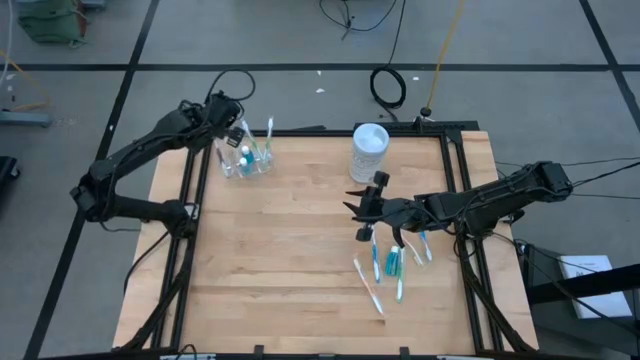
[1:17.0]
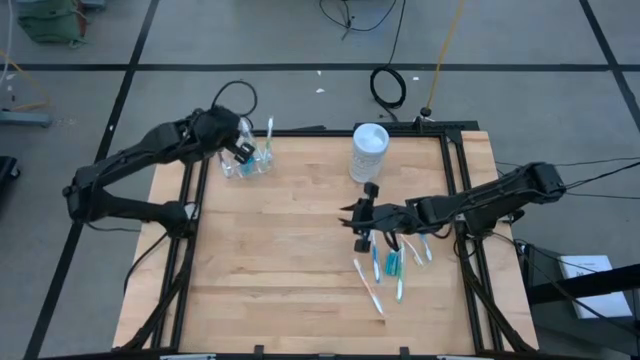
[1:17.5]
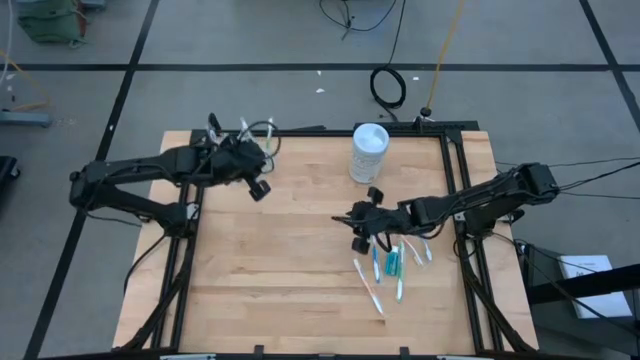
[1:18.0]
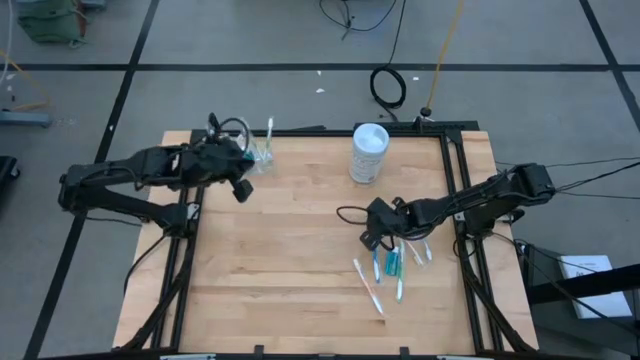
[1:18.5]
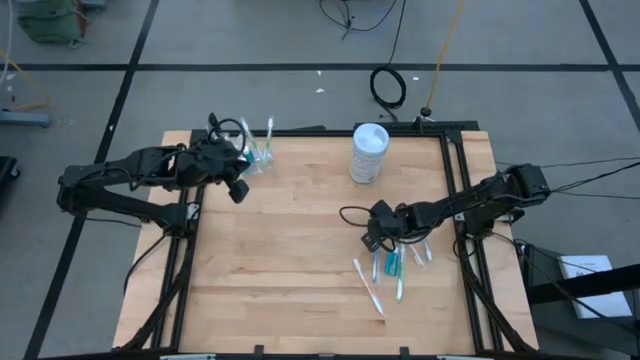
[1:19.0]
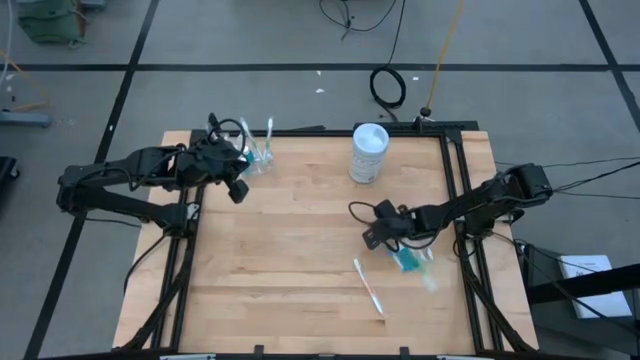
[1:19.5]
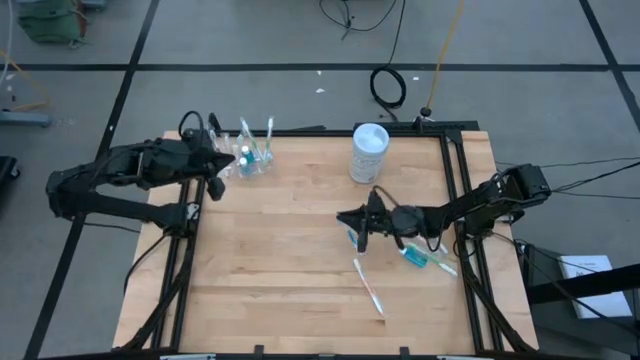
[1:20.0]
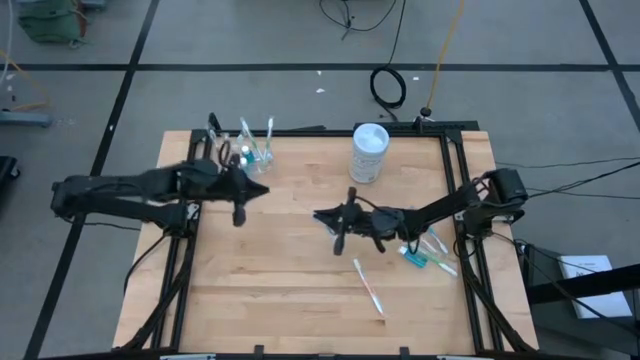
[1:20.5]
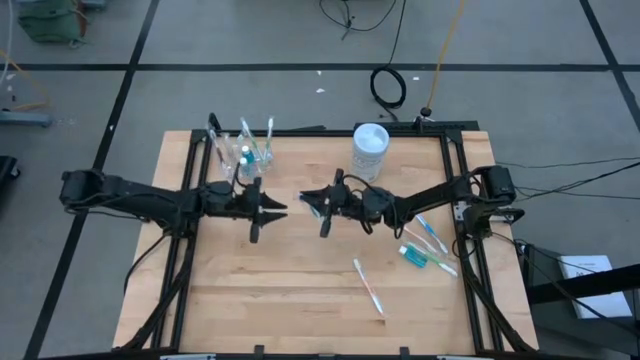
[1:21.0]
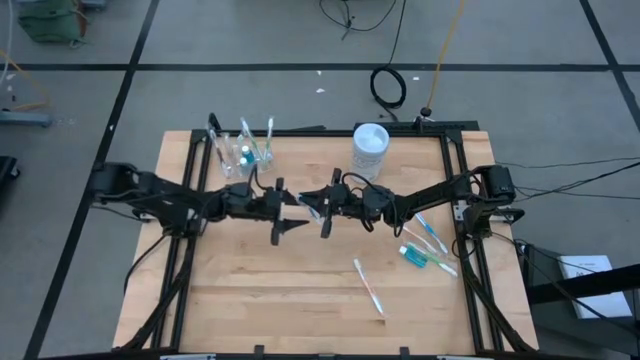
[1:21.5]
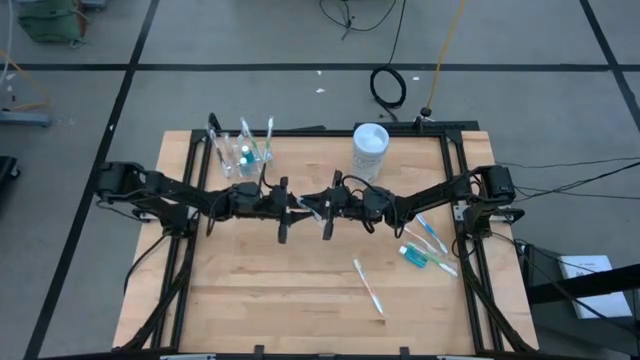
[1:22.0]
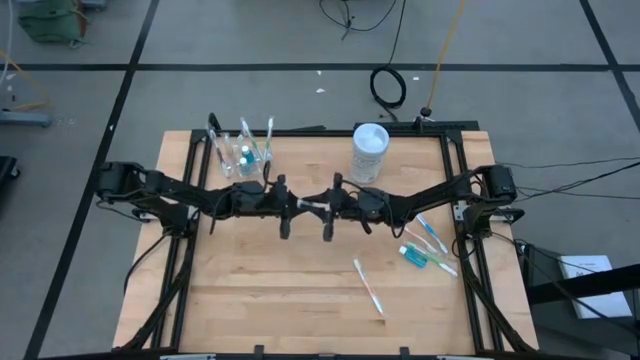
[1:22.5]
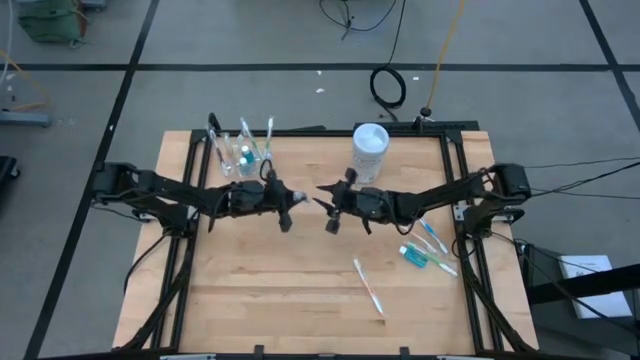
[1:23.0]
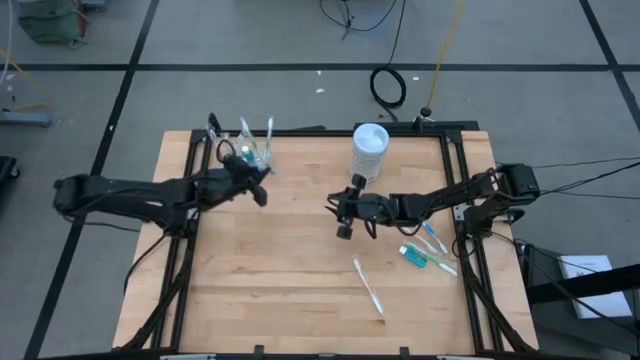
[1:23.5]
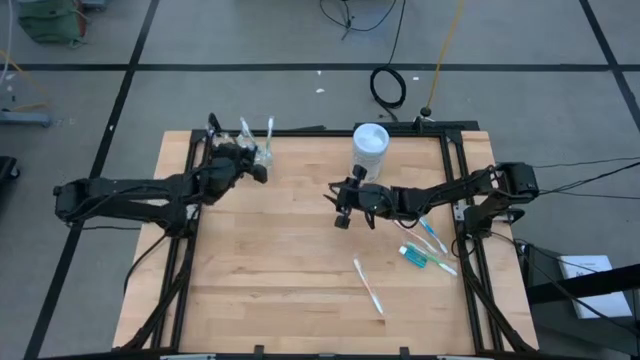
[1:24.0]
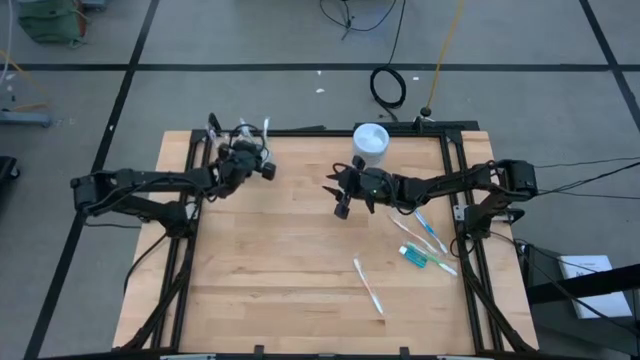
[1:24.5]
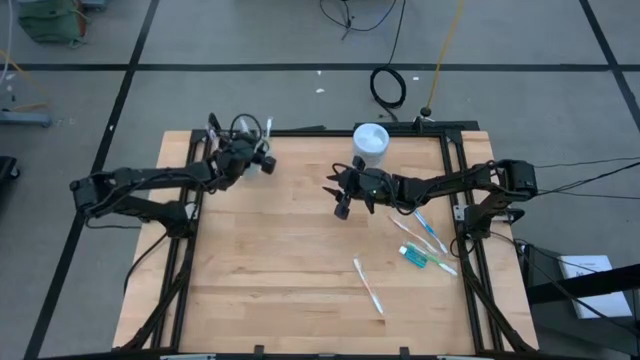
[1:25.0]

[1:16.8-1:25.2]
Task: Pick & Place toothbrushing station
Put the blue toothbrush into the transparent organizer

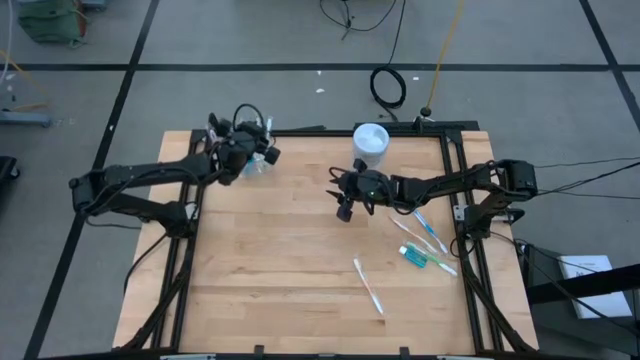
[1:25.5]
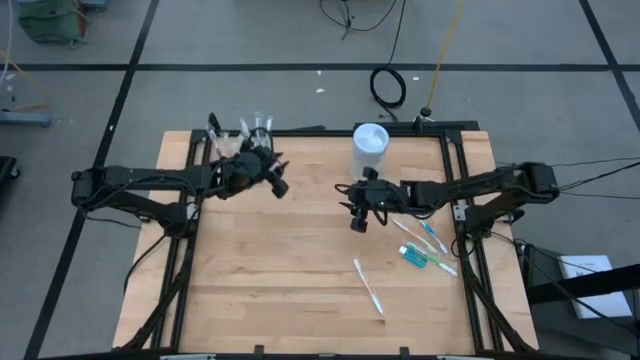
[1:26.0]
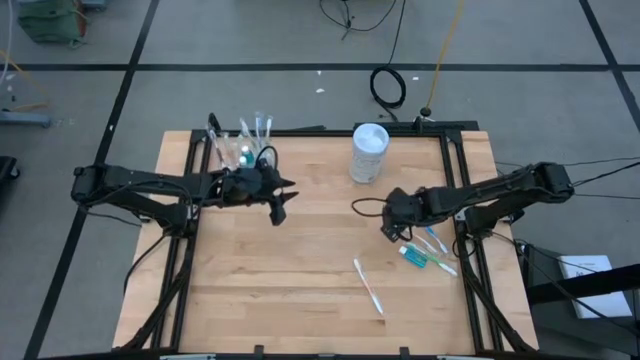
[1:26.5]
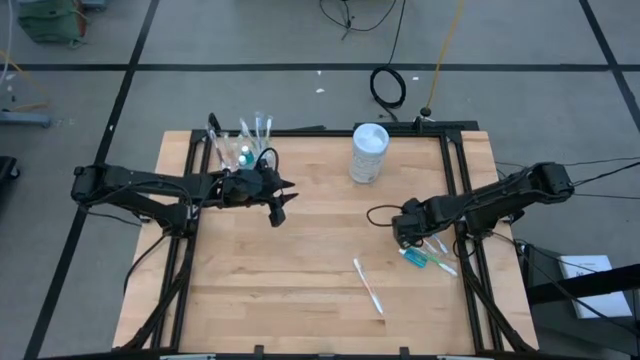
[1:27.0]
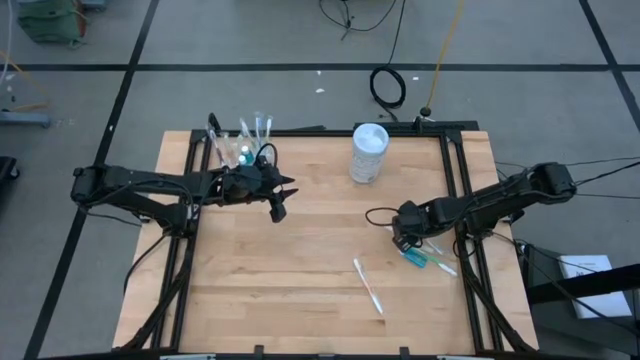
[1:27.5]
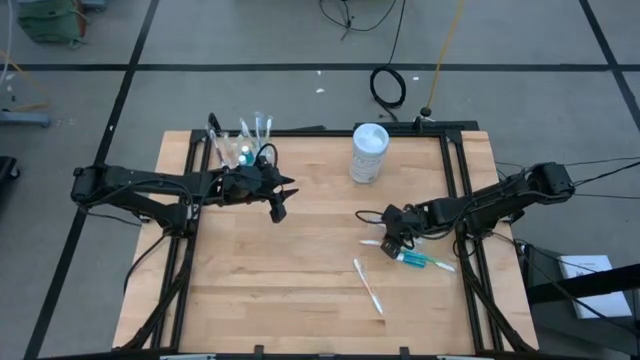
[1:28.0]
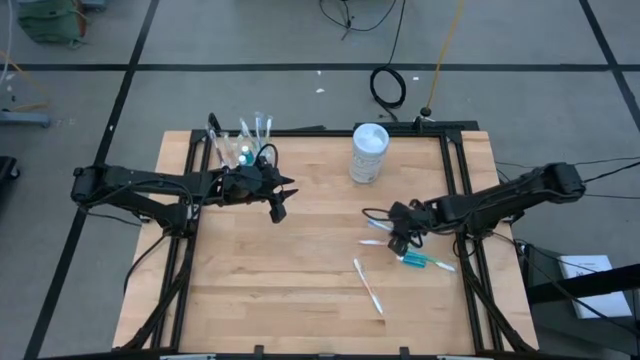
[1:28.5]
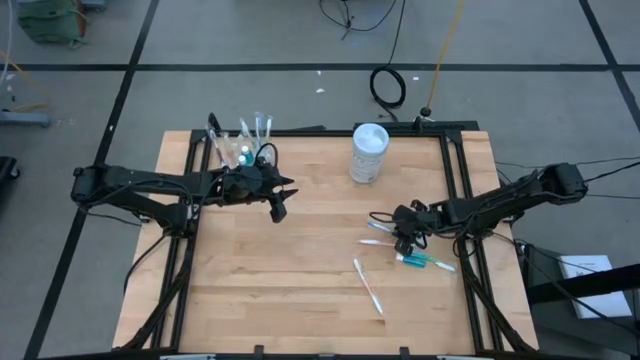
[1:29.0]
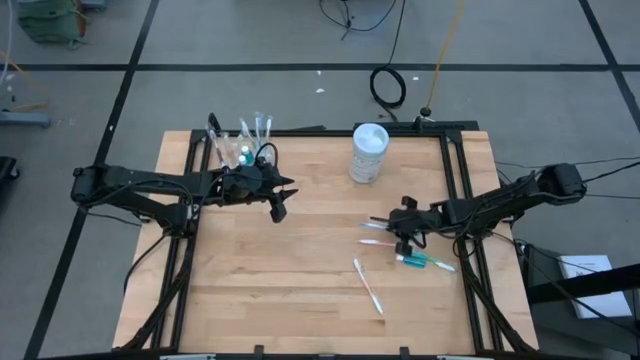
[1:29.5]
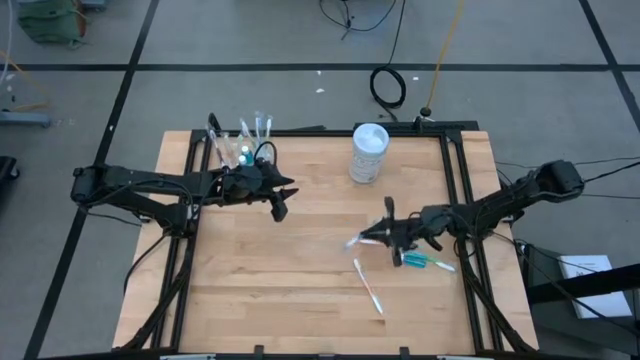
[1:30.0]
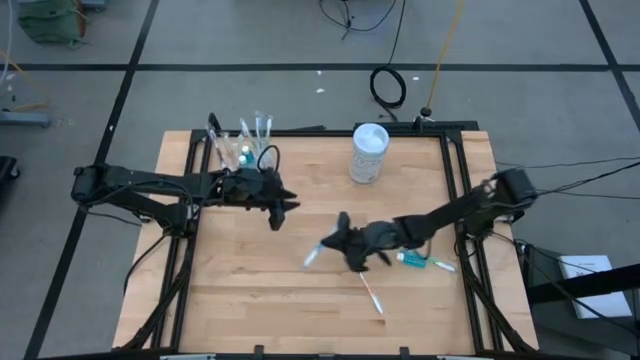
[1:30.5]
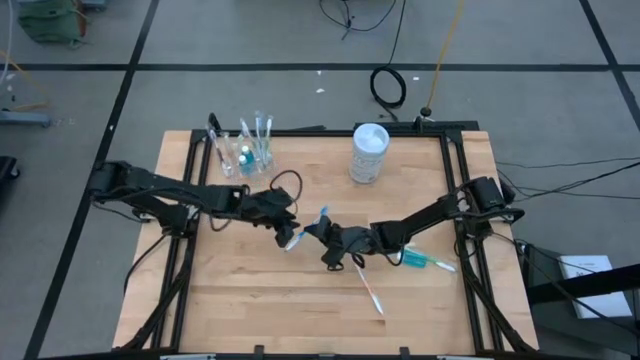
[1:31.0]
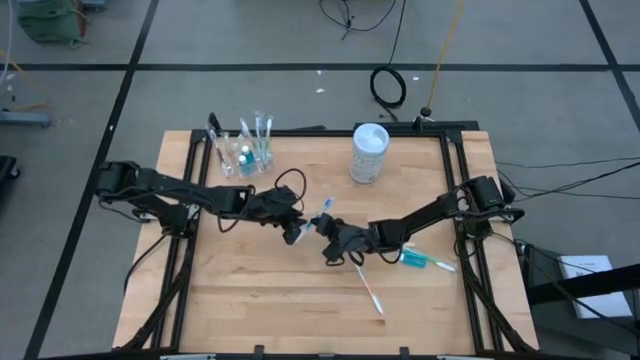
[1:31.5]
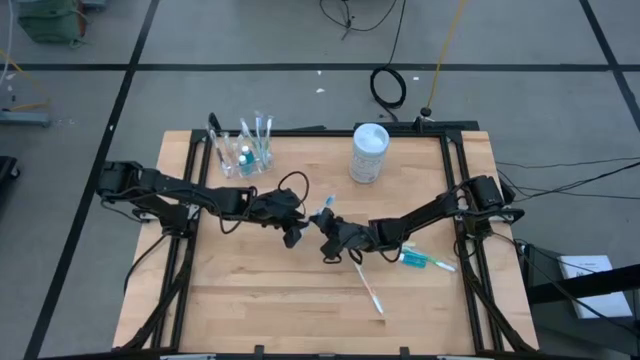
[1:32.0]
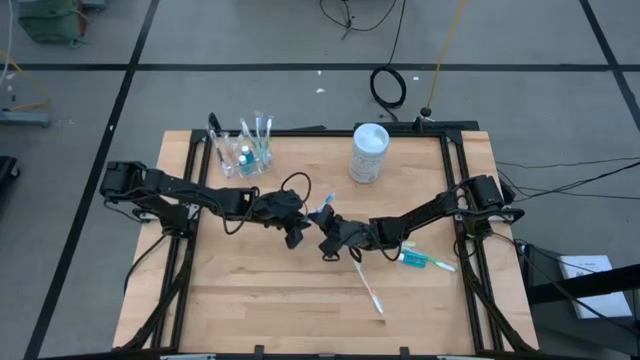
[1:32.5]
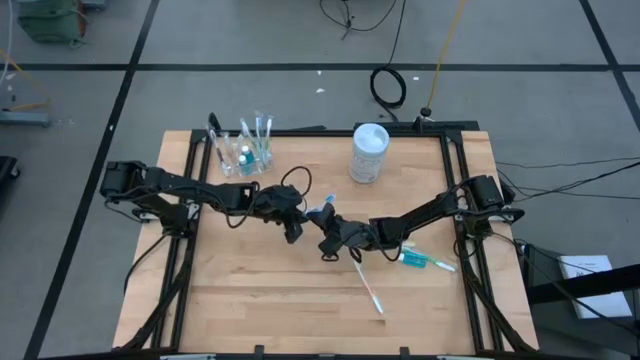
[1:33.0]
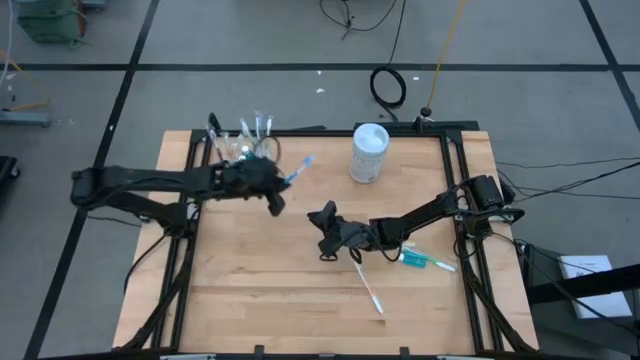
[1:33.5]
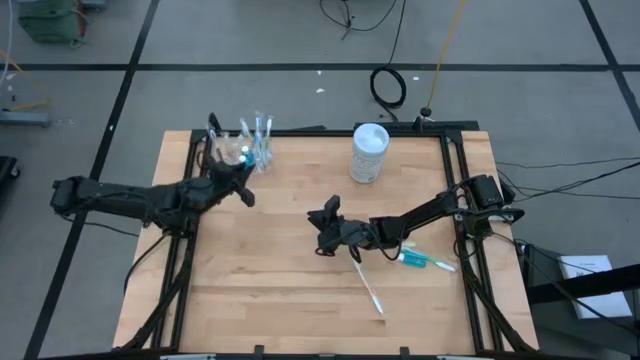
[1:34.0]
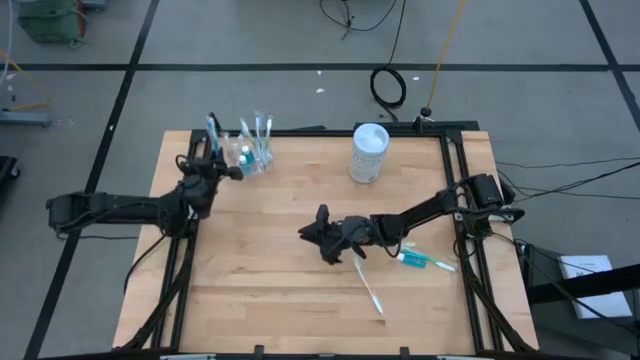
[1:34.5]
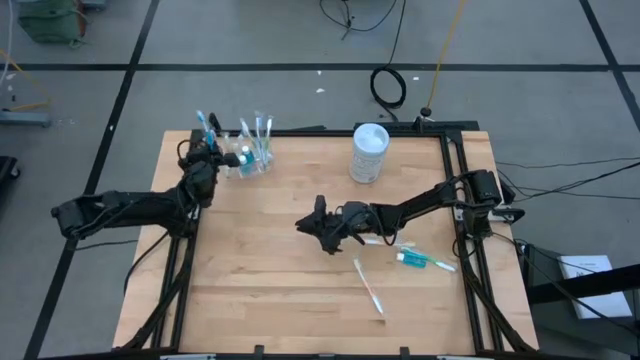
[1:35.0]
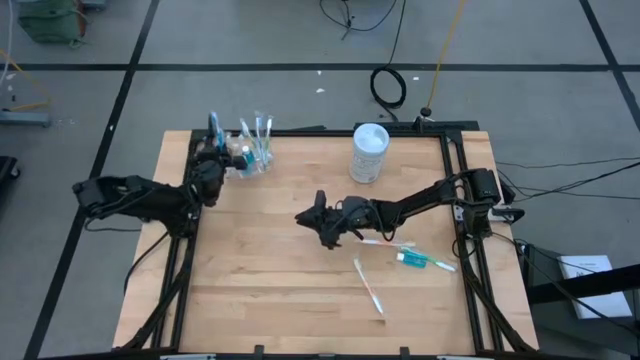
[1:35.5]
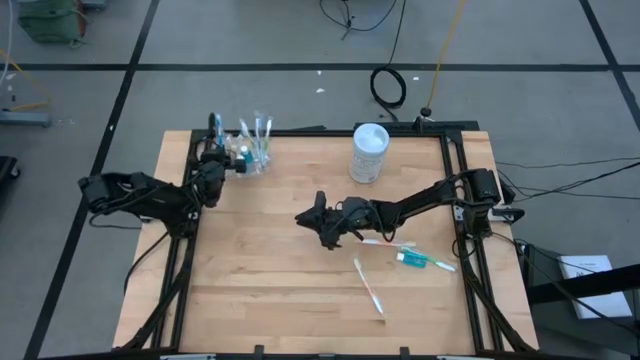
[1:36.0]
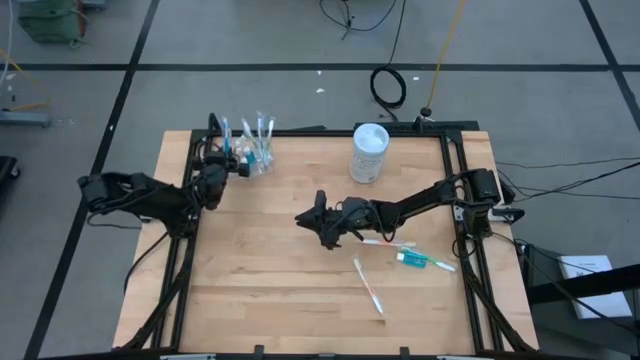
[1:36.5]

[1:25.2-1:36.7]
Put the blue toothbrush into the transparent organizer
